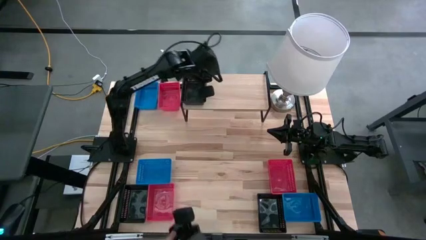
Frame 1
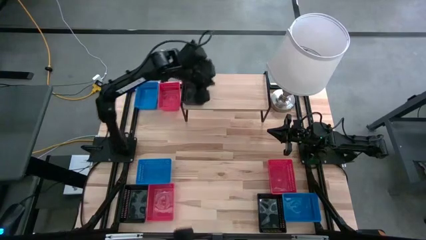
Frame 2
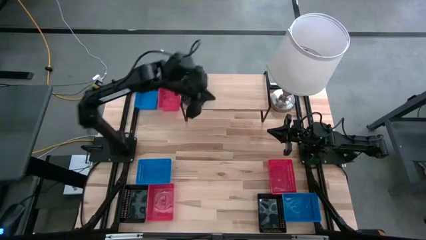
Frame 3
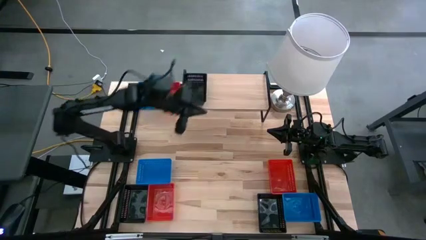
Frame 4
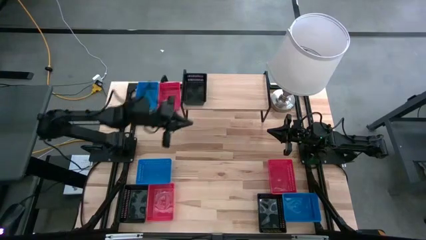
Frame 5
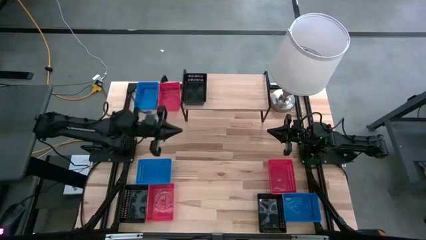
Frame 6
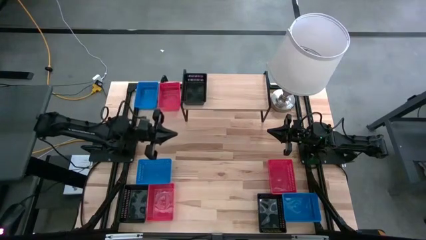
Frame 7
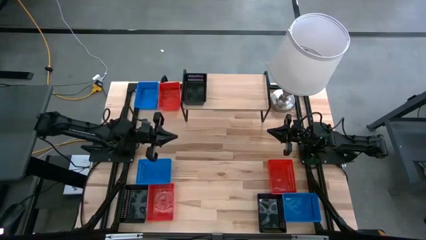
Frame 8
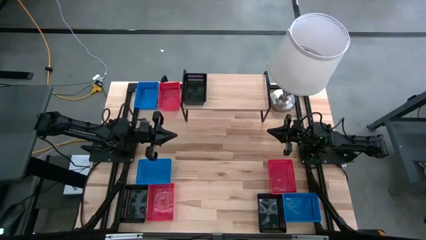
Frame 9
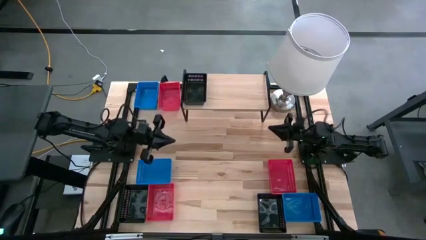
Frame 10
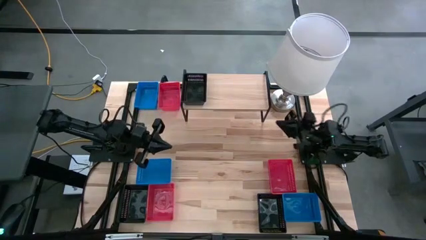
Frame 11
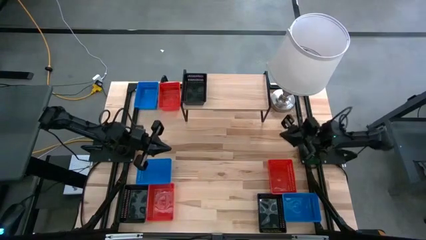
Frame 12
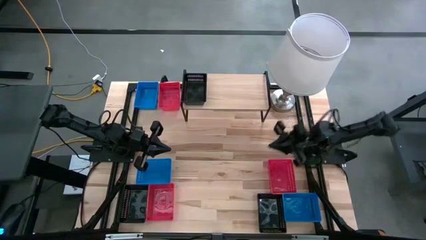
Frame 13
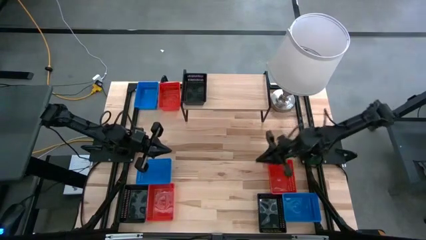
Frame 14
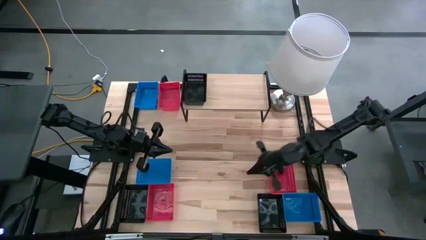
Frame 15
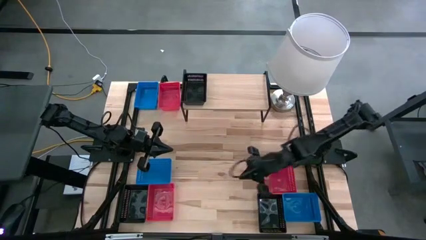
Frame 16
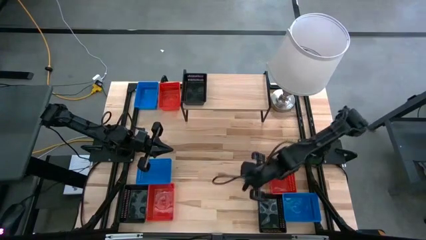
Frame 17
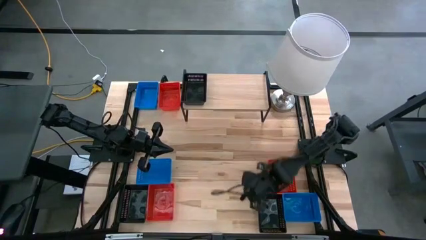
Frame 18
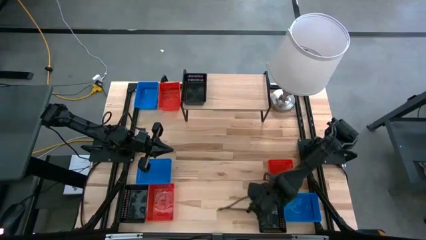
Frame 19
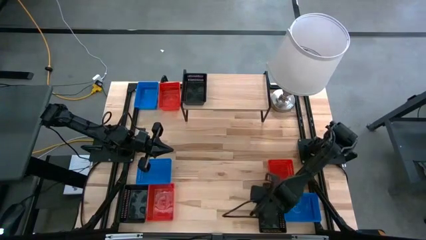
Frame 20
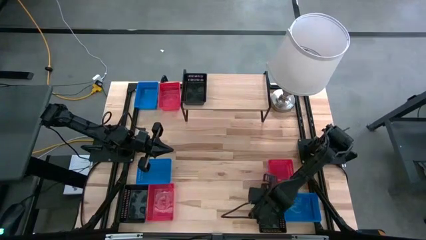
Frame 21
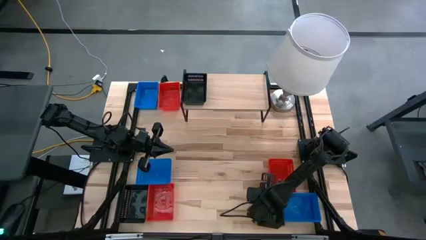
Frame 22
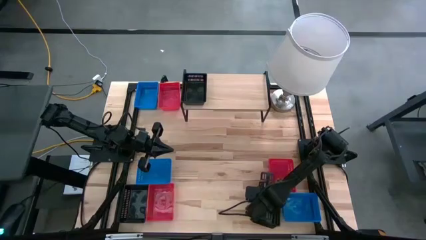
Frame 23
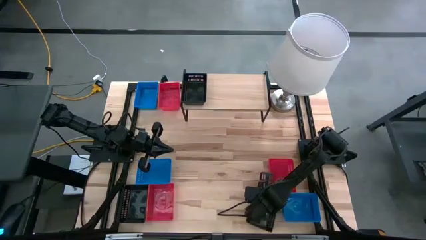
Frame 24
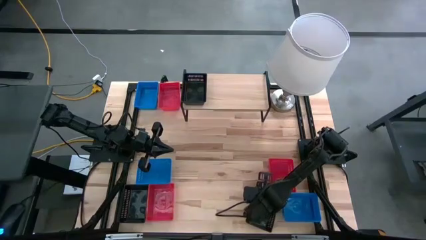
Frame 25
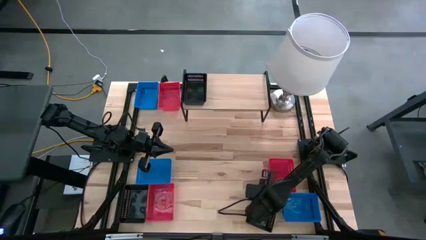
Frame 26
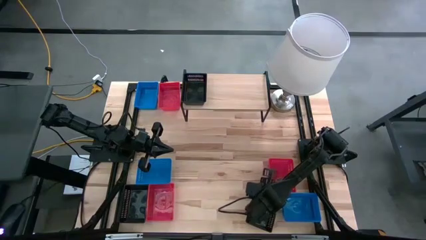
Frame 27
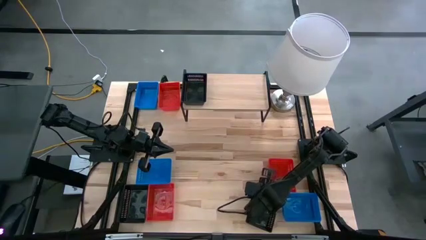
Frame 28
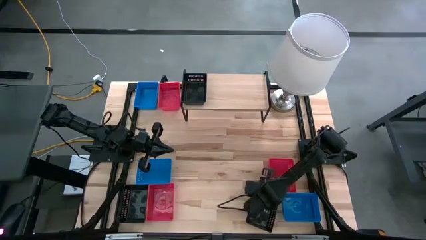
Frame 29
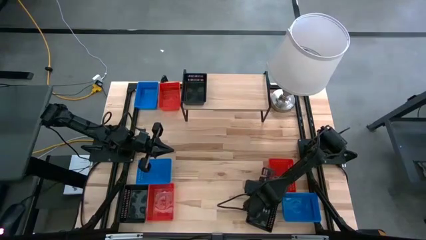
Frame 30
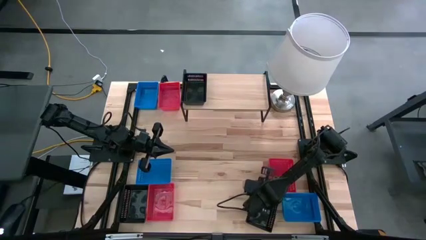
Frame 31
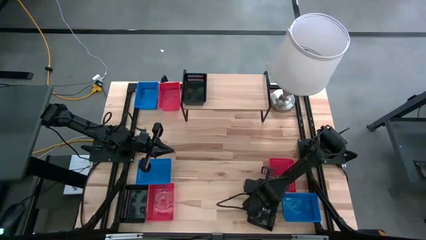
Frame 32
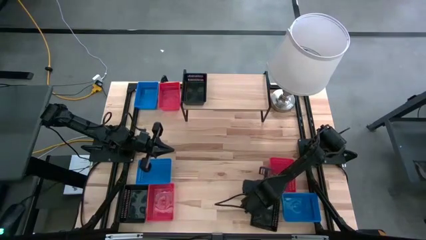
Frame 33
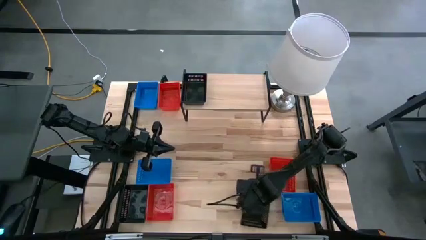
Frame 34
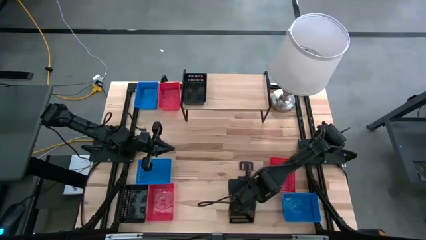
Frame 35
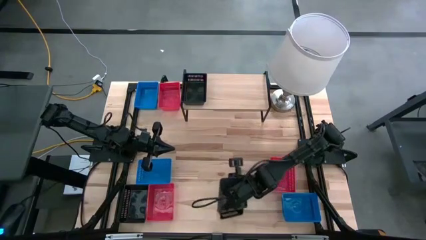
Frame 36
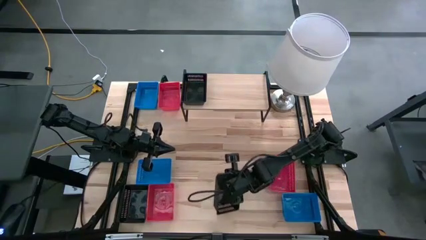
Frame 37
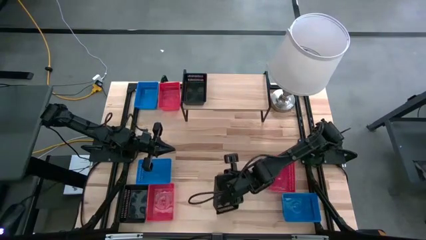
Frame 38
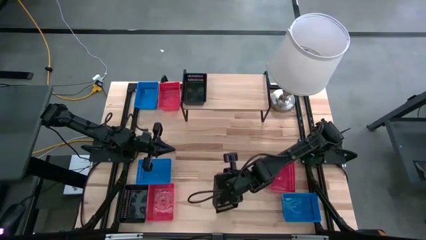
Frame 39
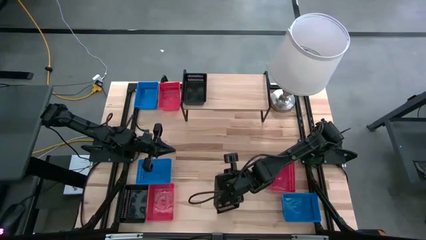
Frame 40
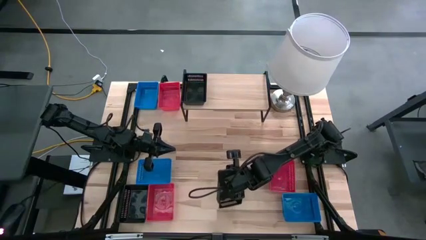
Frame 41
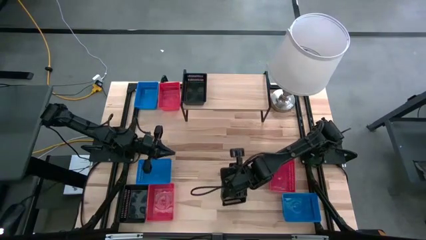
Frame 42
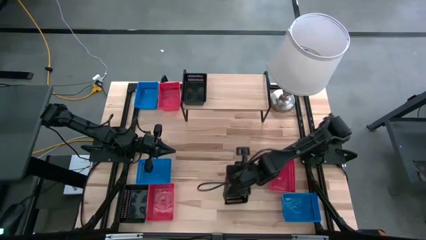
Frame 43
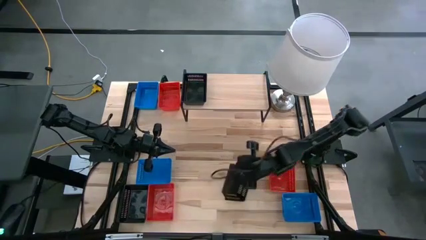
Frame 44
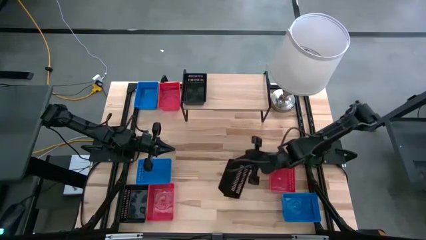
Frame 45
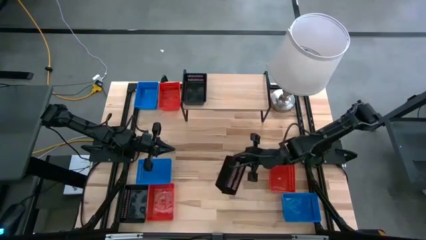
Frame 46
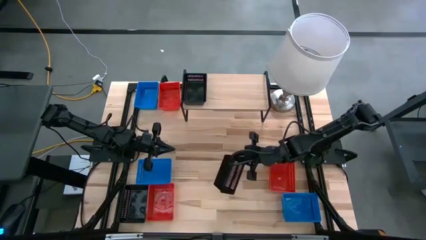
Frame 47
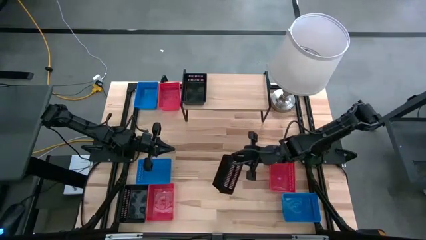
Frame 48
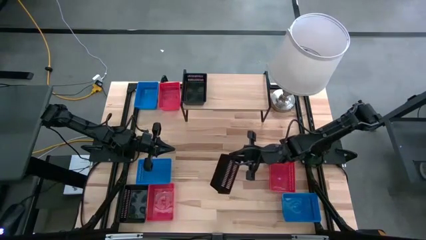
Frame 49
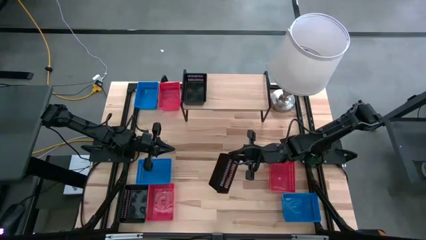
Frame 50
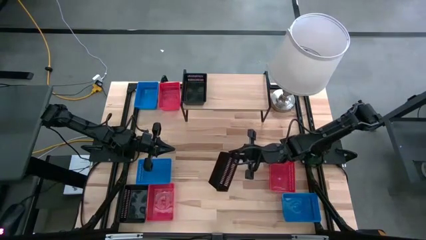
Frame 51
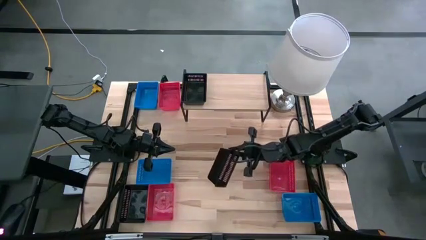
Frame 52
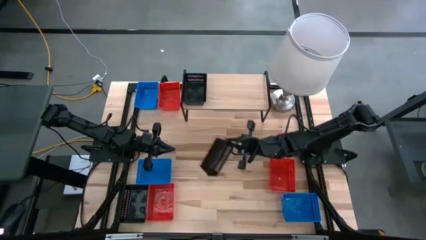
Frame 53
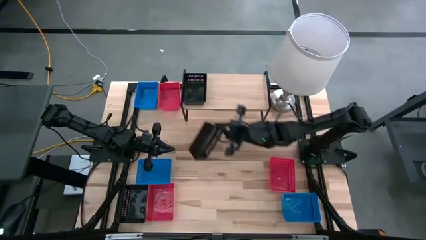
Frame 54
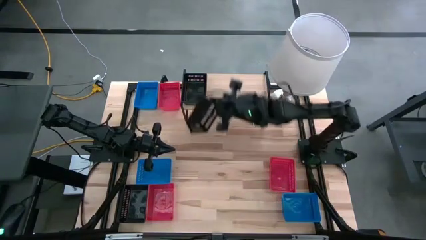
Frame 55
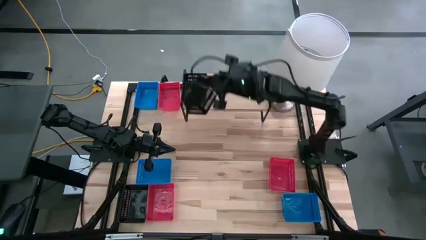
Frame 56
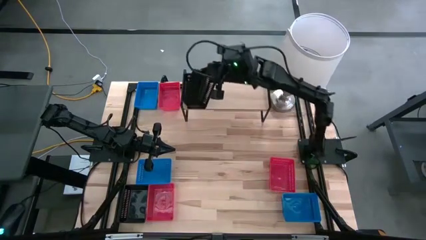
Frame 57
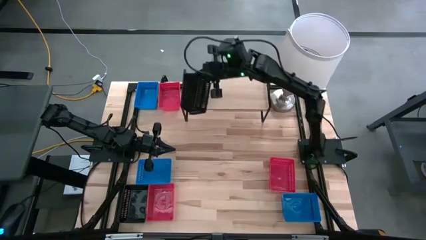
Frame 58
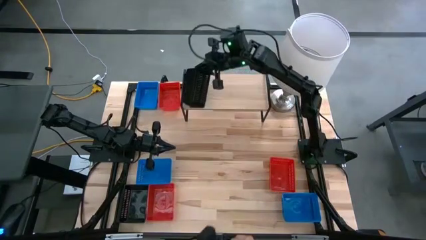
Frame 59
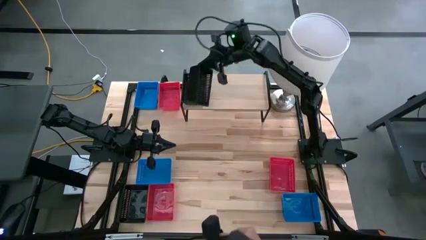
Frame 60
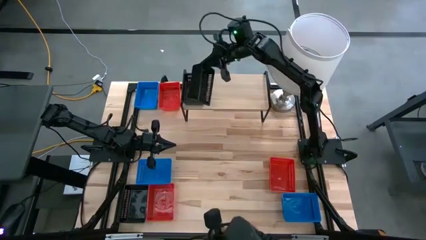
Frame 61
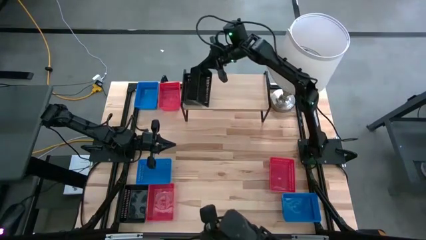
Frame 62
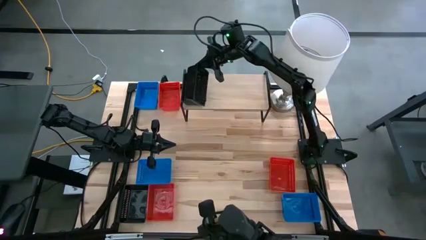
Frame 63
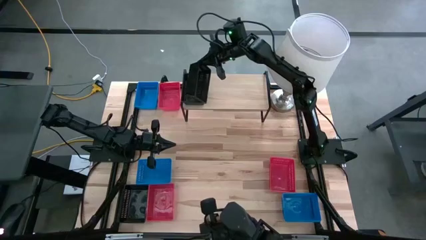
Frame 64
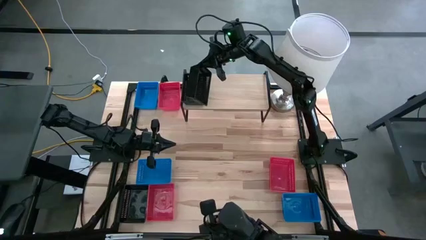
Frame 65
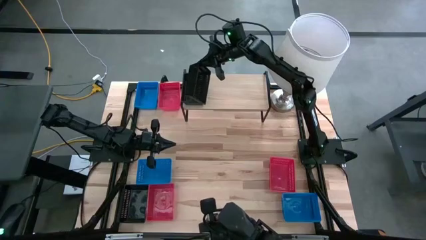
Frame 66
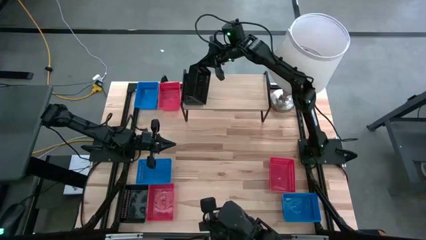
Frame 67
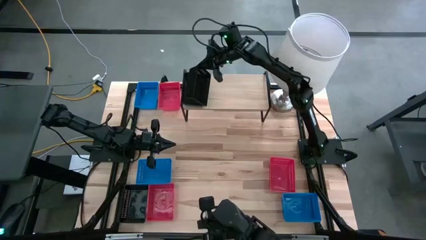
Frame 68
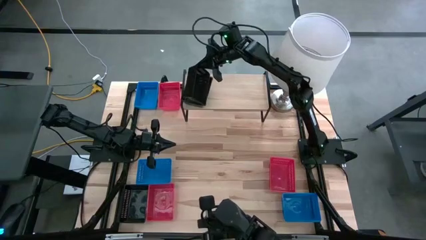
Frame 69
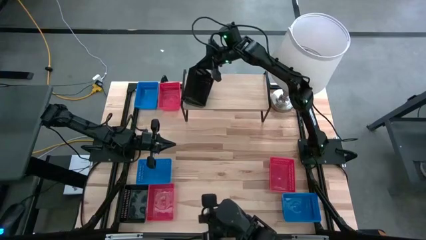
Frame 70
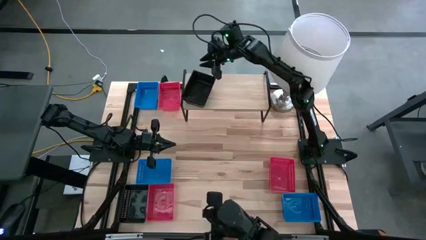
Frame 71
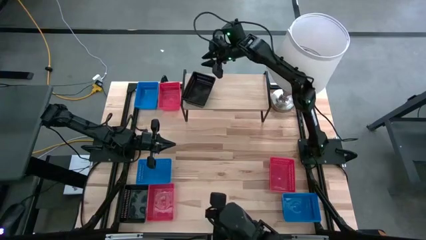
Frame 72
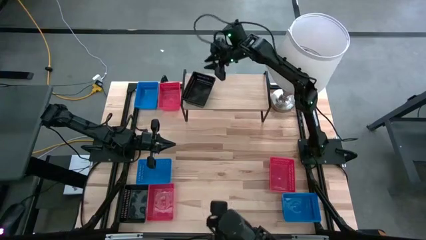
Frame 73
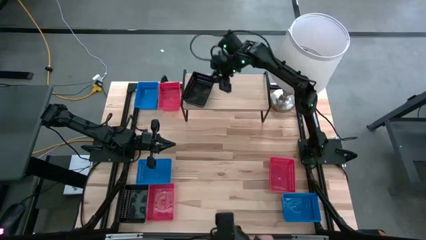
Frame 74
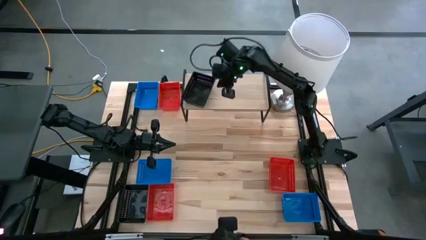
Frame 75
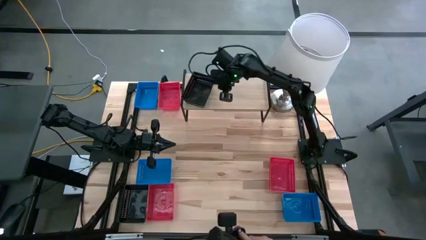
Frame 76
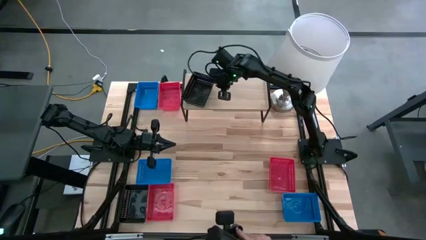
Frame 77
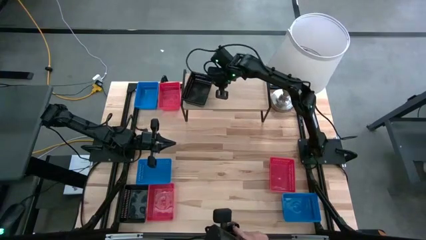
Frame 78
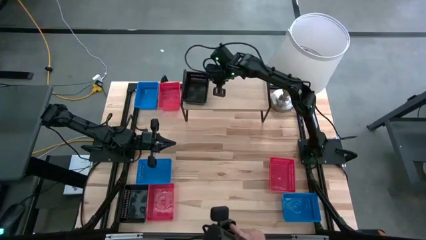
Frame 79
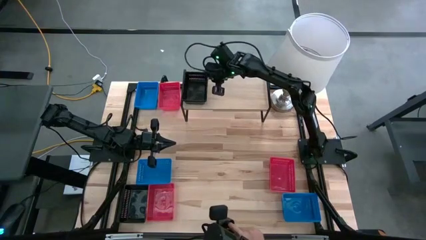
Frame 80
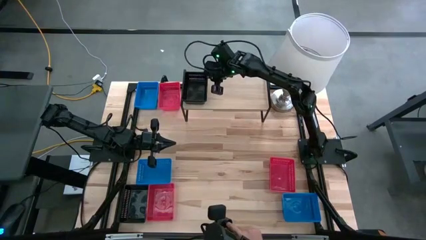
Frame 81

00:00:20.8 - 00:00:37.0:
Task: Stack baskets on shelf by color
Stack the right black bin on top of the black bin on the shelf
